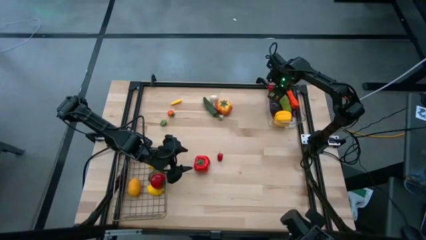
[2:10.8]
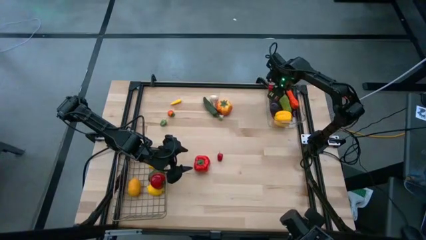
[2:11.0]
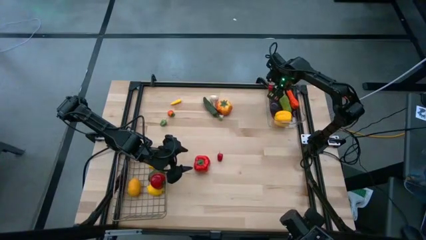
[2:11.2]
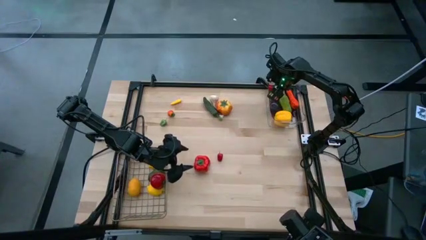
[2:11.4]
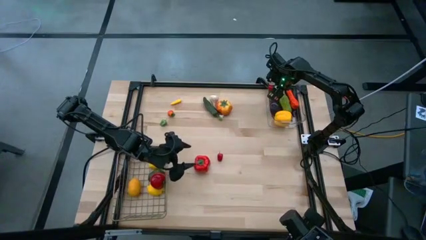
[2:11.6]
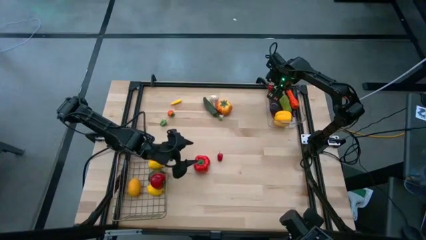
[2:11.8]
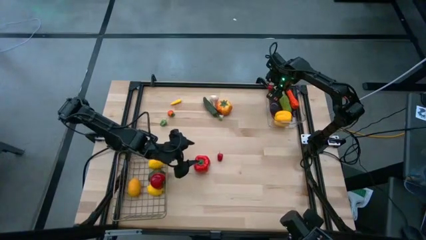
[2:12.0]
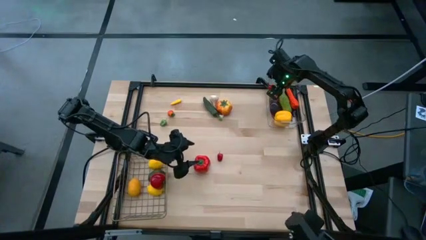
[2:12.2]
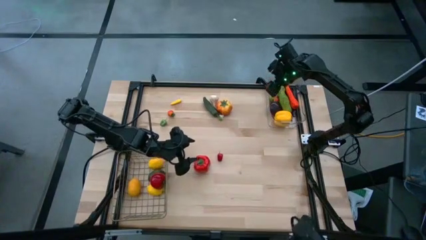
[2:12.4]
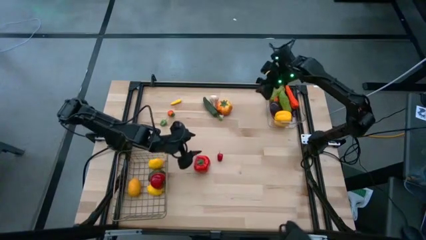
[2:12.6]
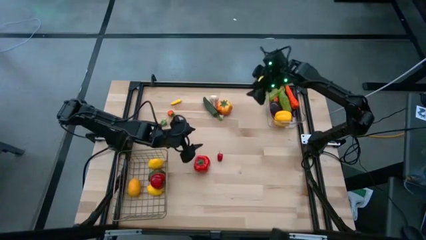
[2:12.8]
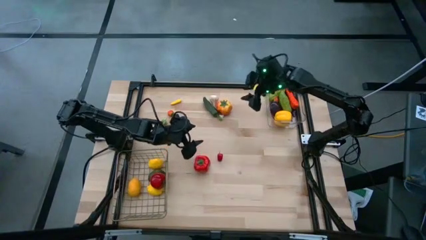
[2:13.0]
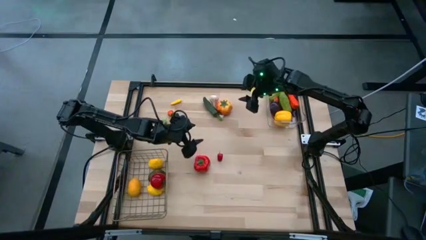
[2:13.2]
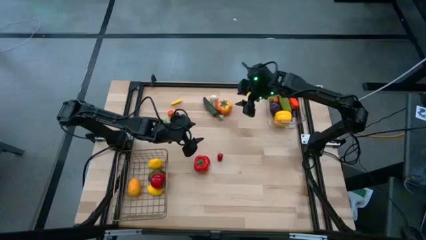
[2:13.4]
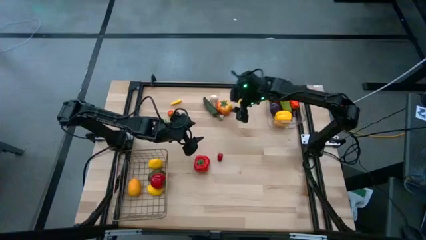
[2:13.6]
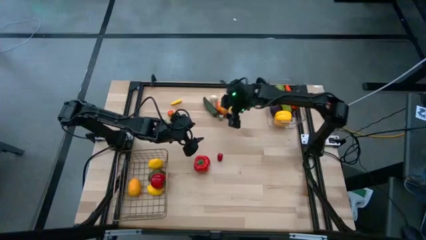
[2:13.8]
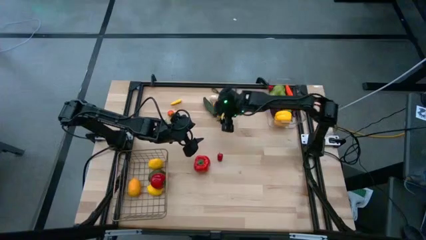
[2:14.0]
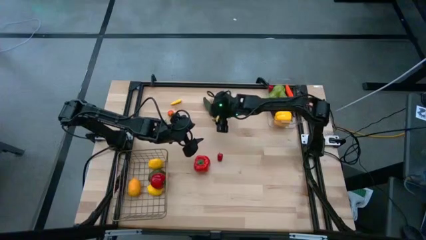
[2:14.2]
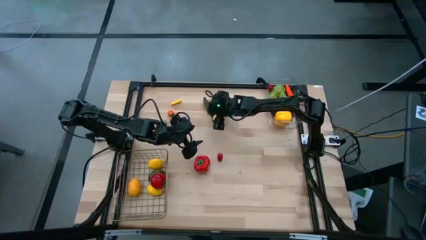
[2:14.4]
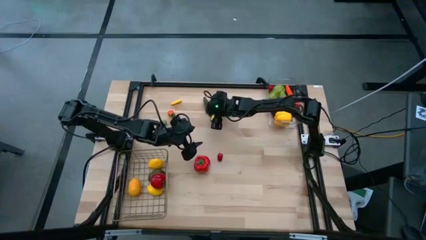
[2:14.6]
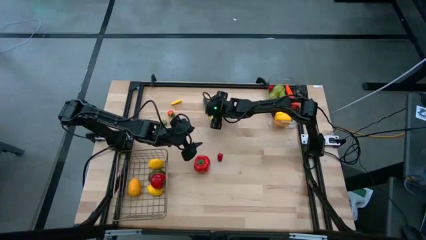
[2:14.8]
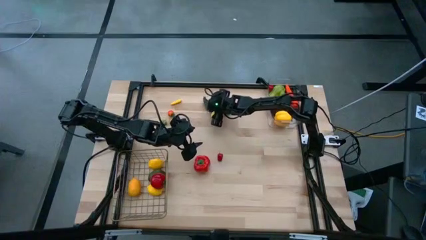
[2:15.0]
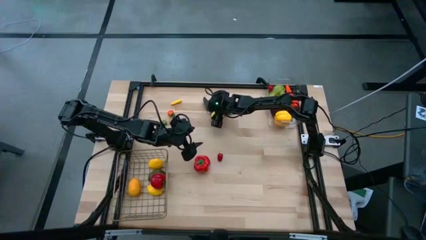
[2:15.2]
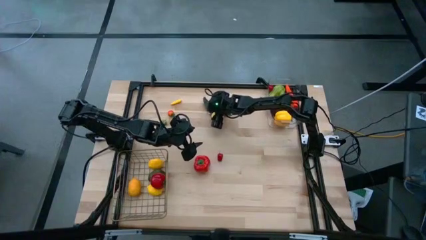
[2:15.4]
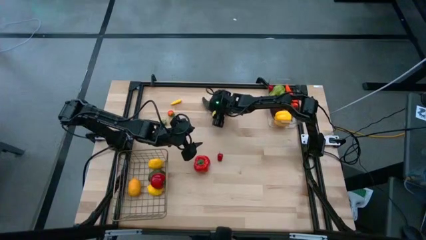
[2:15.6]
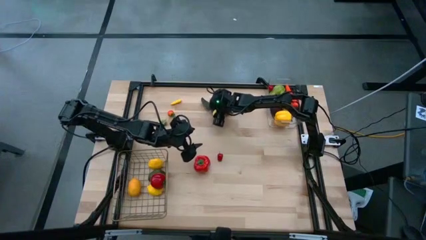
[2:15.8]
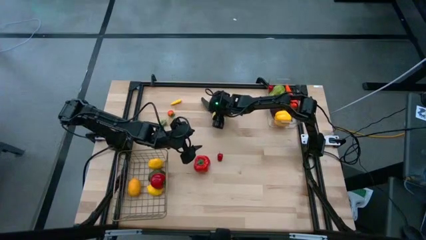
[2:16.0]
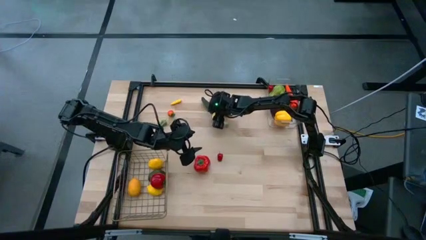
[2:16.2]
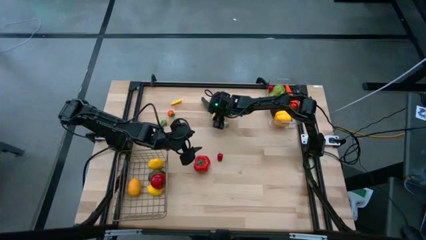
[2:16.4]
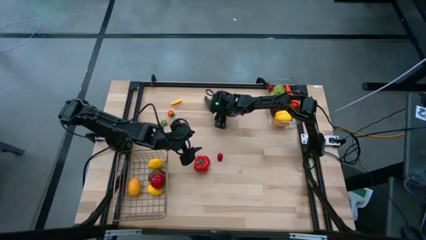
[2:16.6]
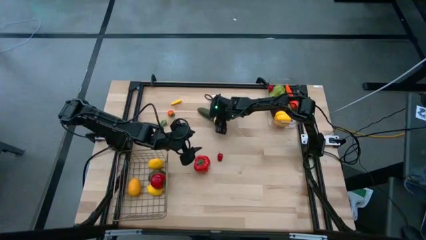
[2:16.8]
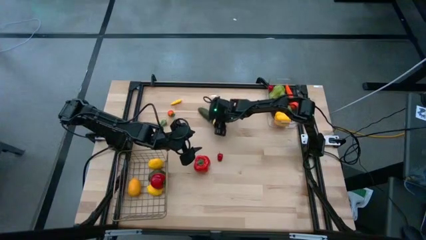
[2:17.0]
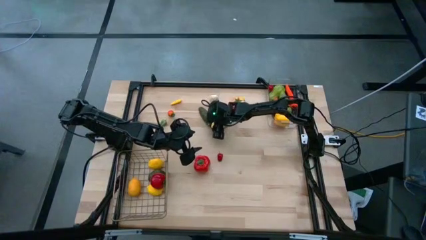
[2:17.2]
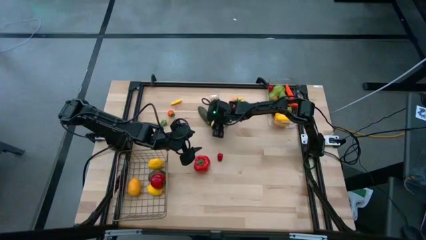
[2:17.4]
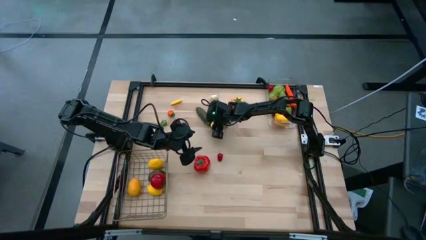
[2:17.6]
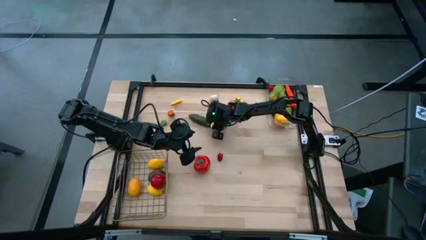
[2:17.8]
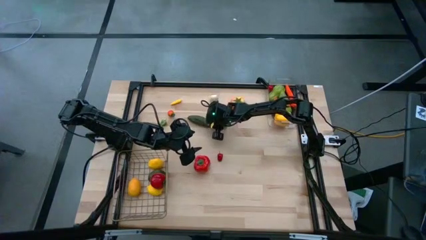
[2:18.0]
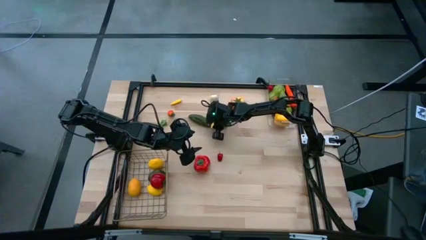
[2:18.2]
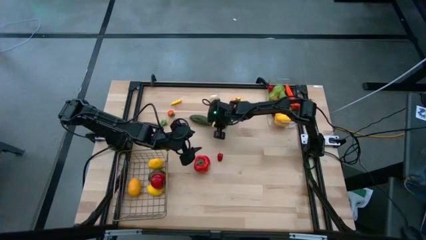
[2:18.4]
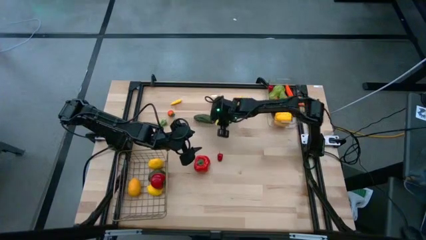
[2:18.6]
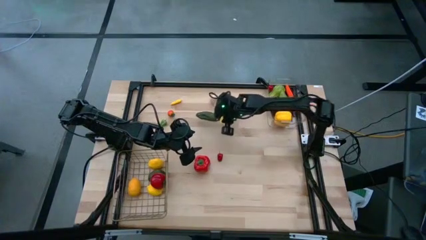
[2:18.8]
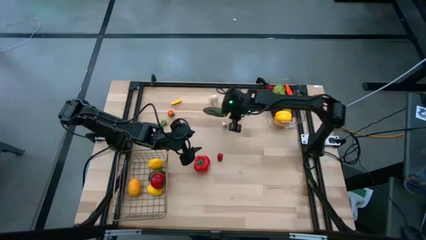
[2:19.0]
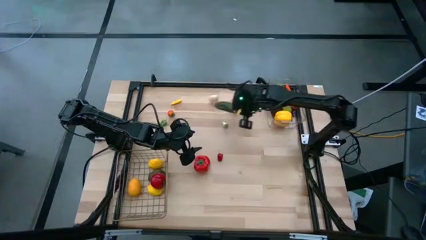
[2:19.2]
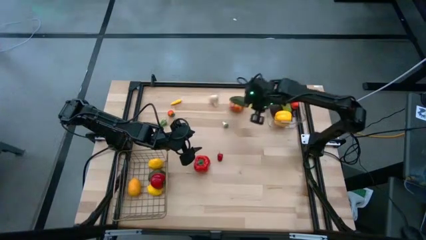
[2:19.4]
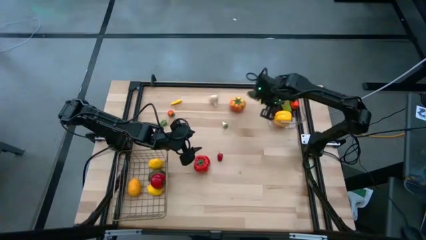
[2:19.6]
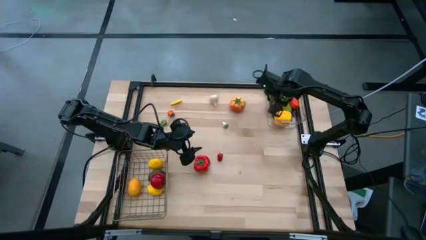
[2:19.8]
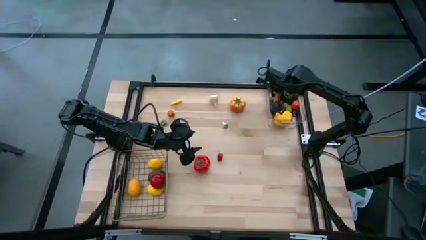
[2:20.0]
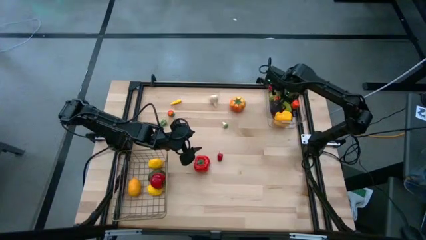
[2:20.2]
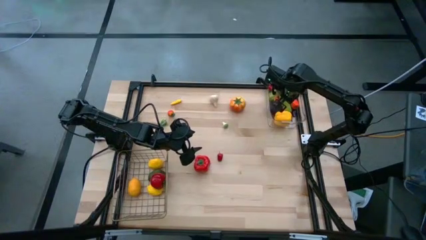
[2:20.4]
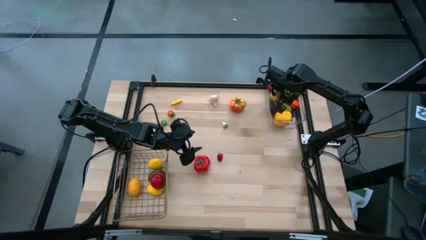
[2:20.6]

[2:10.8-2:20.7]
Task: Sort produce into baskets
Put the green chili pepper into the transparent bin

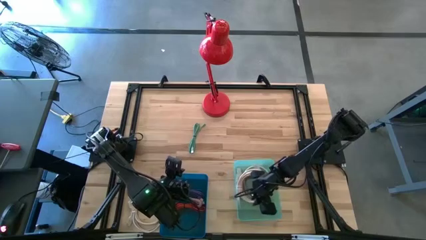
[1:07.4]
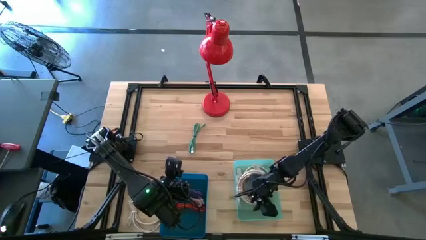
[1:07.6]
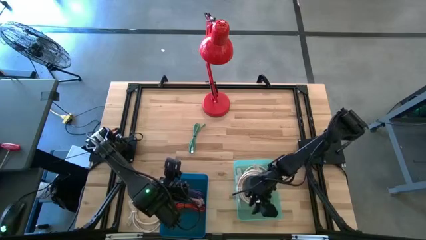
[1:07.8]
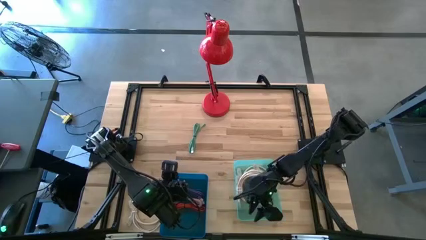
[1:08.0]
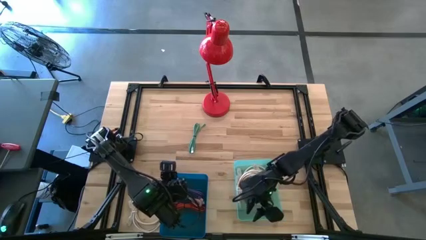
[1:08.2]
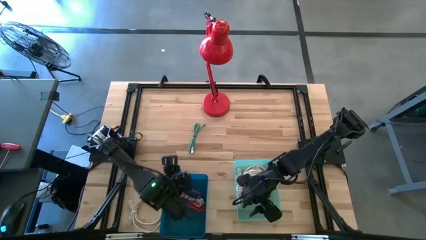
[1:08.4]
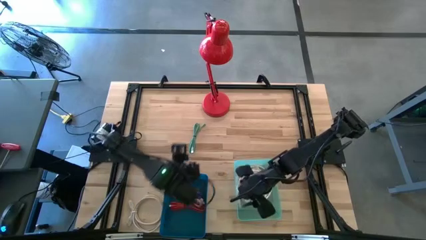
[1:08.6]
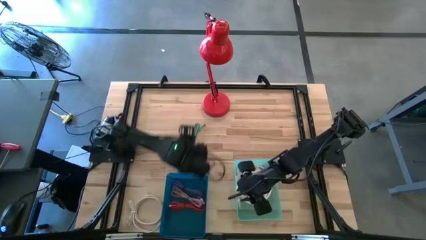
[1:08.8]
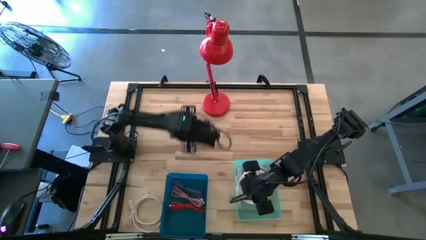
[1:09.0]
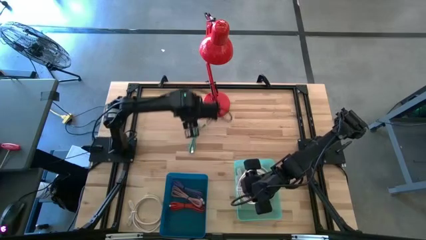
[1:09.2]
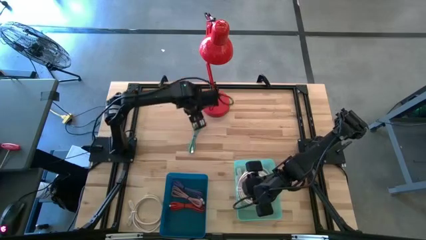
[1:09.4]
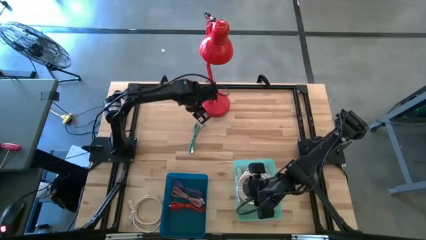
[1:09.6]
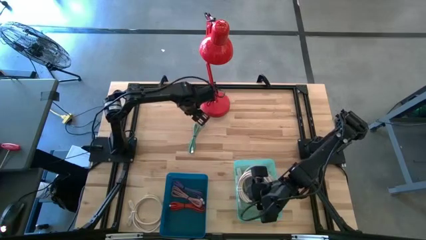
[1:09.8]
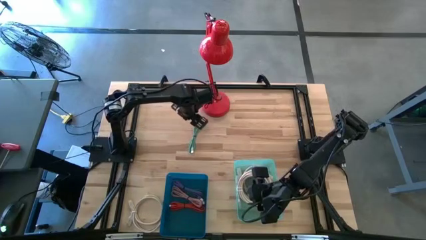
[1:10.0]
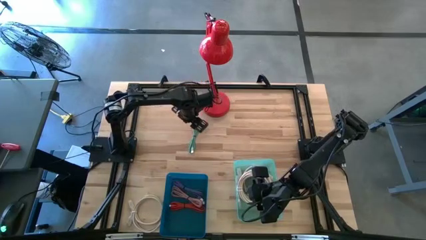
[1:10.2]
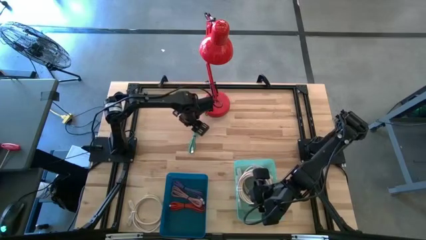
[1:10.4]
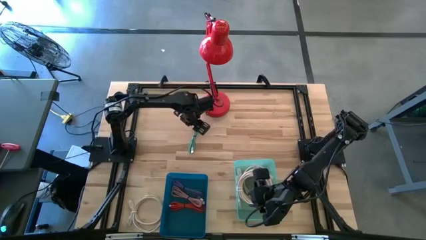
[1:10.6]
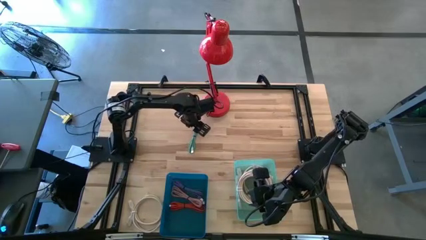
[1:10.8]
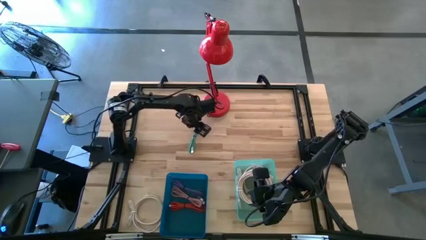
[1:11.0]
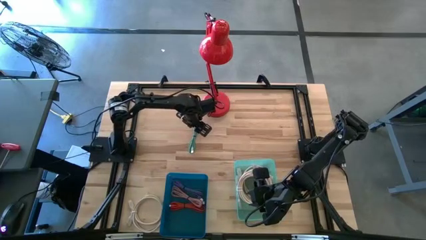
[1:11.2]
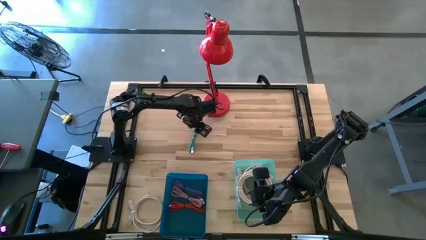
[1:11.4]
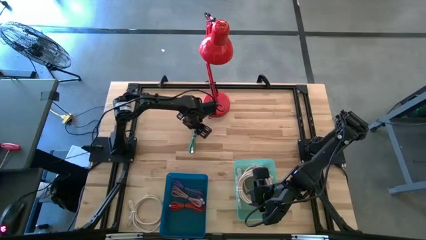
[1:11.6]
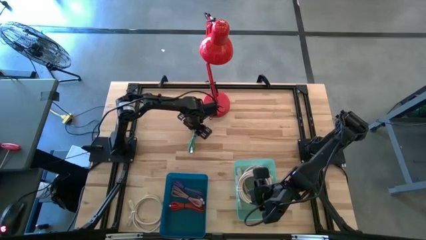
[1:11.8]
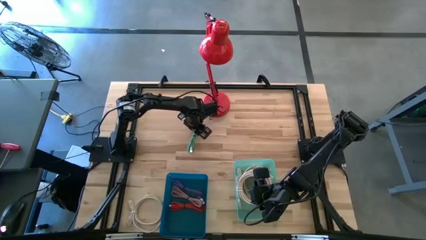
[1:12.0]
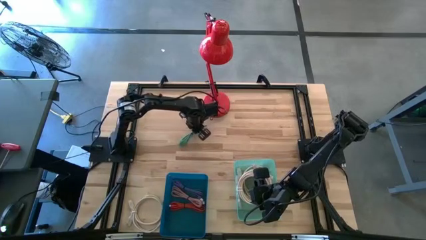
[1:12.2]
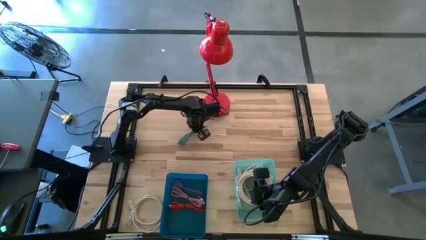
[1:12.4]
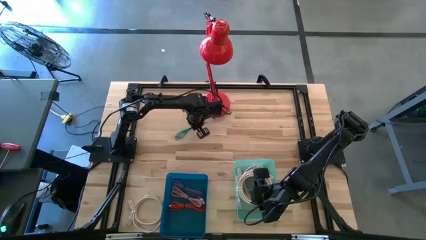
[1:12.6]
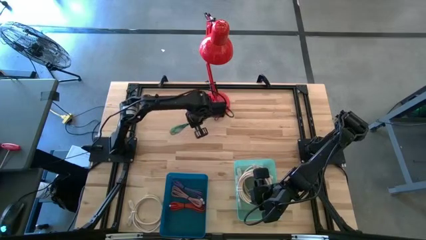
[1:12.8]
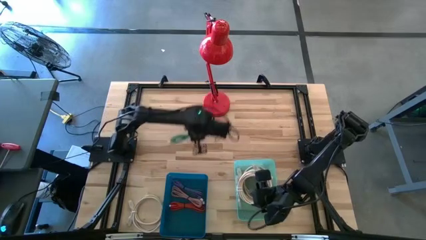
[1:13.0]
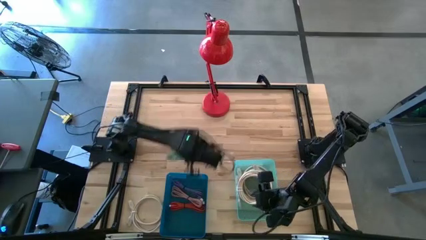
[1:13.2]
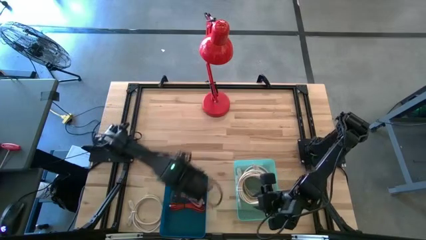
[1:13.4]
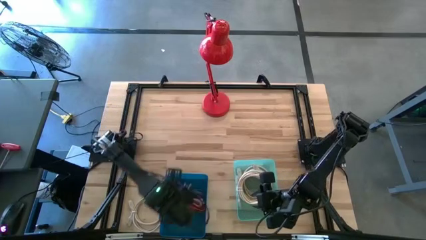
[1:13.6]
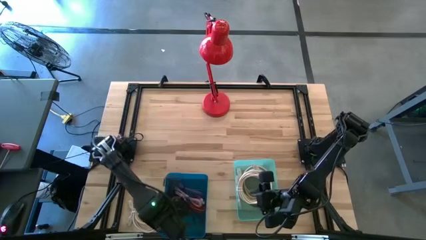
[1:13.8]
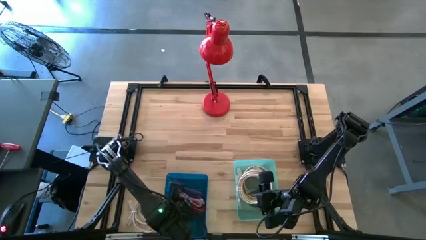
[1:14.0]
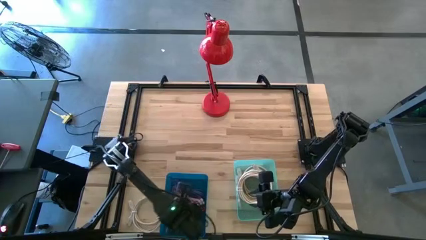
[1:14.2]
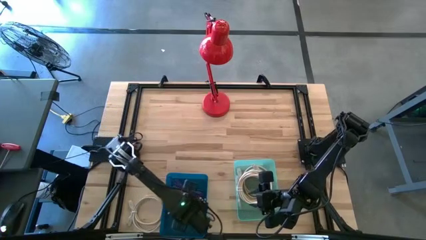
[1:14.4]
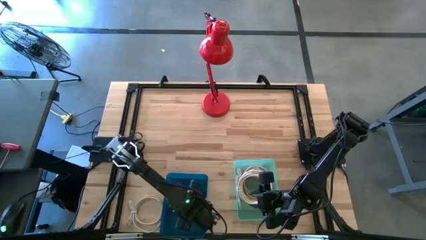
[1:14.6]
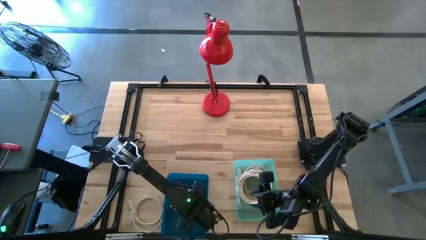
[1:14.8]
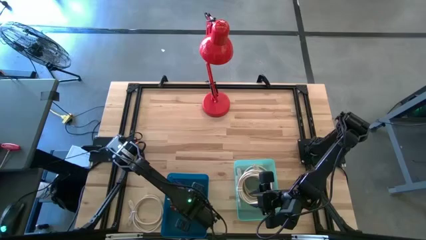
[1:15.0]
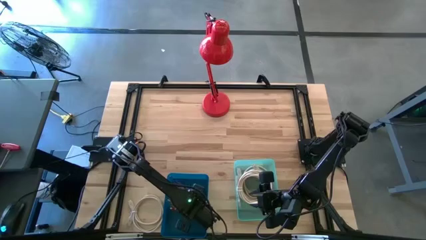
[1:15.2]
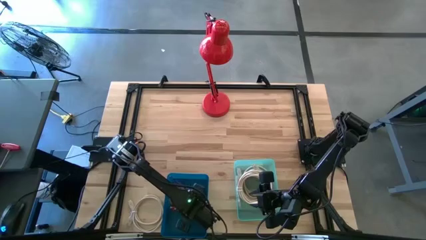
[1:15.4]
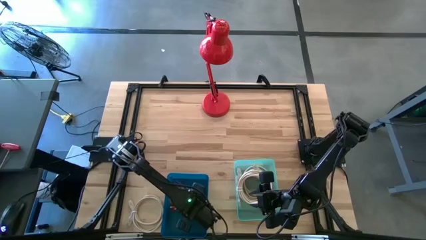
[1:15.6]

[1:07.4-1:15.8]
Task: Pick & Place USB Port
Put the green charger cable into the blue bin
